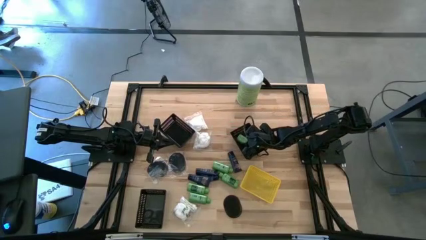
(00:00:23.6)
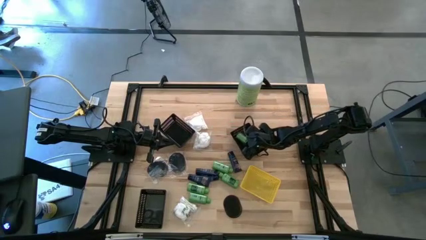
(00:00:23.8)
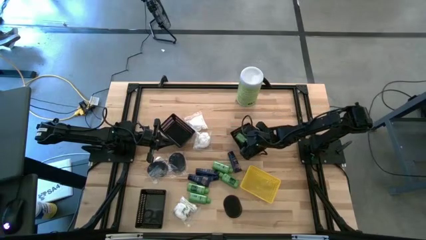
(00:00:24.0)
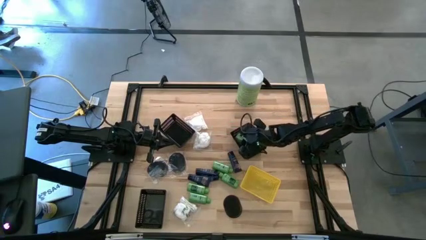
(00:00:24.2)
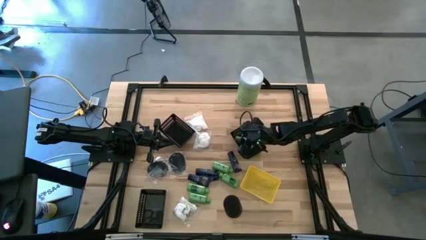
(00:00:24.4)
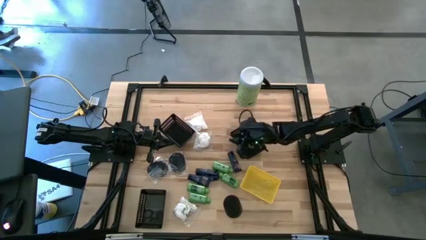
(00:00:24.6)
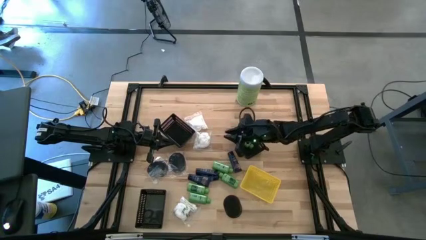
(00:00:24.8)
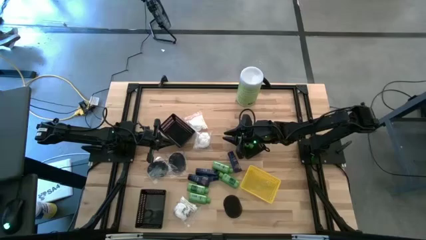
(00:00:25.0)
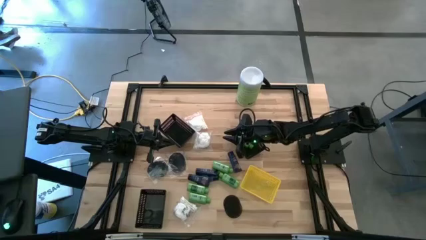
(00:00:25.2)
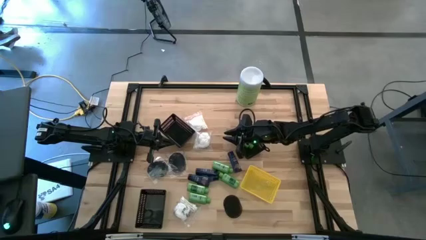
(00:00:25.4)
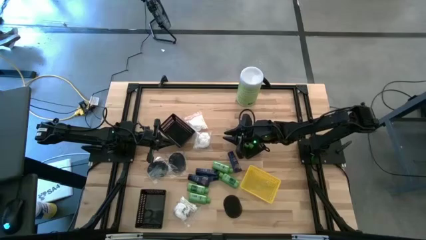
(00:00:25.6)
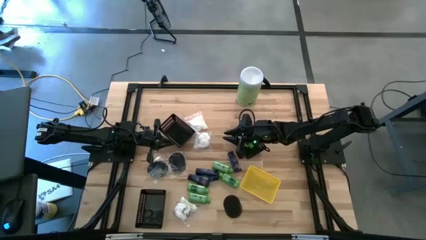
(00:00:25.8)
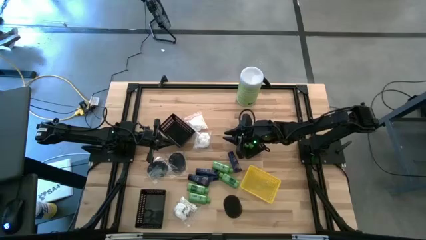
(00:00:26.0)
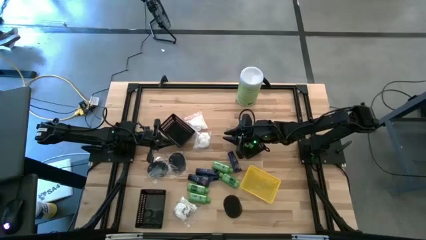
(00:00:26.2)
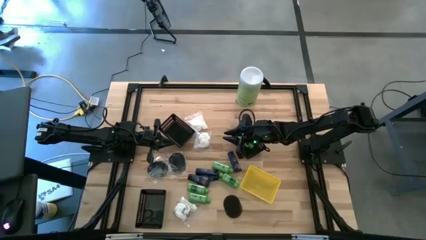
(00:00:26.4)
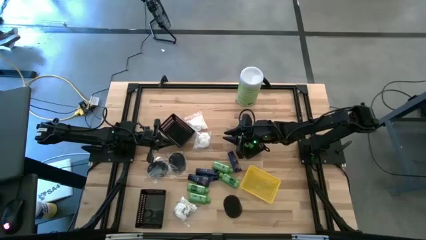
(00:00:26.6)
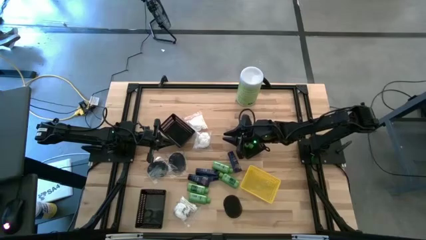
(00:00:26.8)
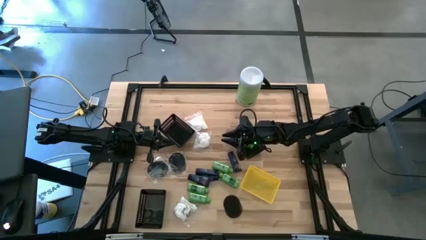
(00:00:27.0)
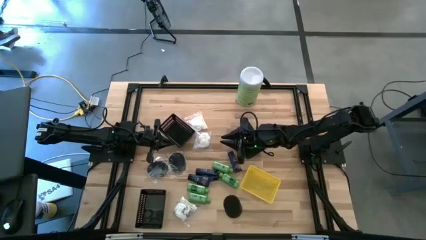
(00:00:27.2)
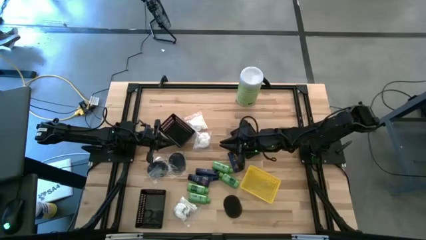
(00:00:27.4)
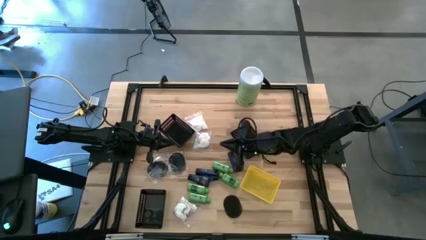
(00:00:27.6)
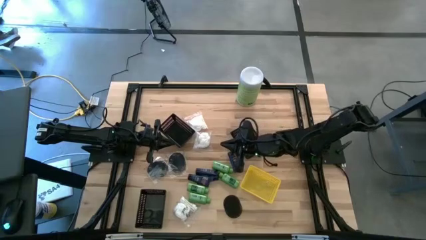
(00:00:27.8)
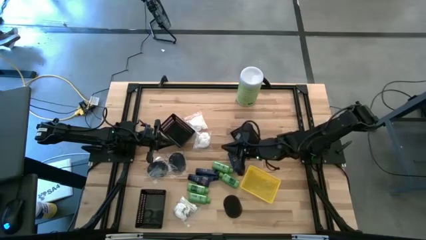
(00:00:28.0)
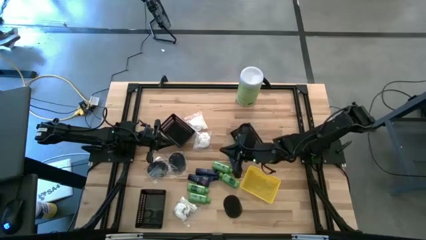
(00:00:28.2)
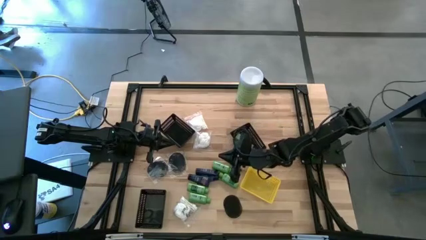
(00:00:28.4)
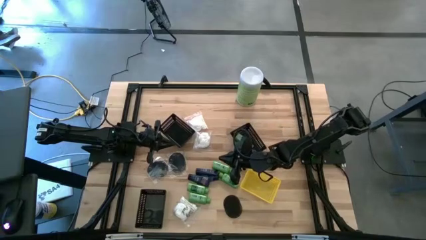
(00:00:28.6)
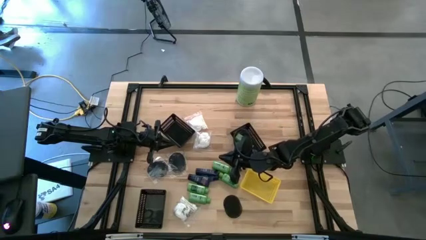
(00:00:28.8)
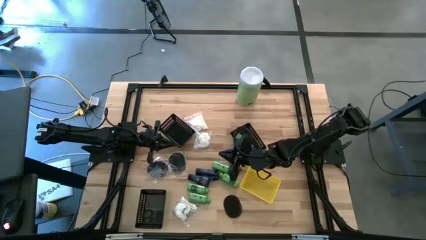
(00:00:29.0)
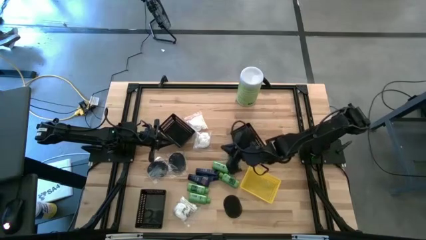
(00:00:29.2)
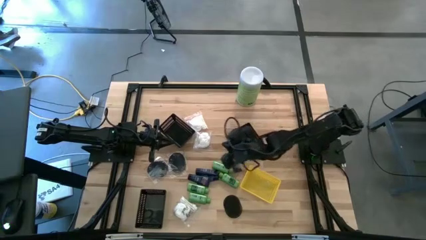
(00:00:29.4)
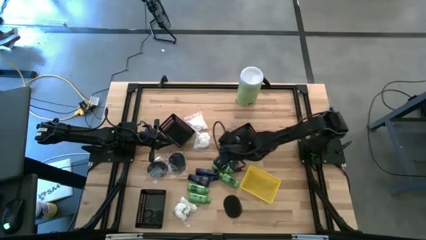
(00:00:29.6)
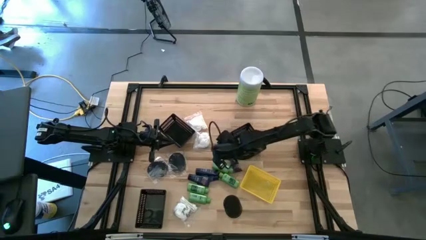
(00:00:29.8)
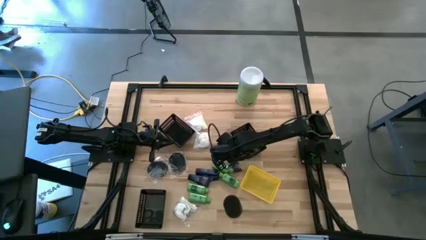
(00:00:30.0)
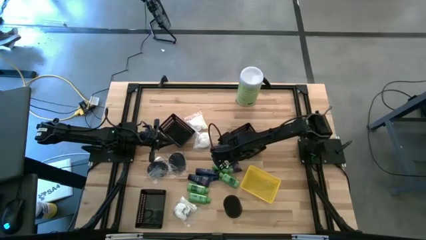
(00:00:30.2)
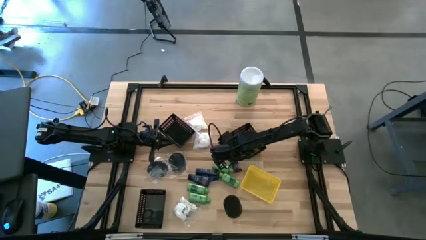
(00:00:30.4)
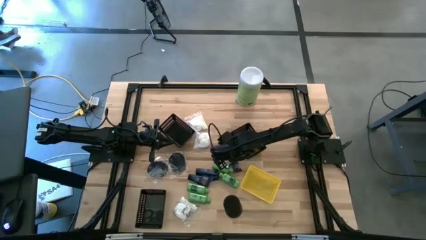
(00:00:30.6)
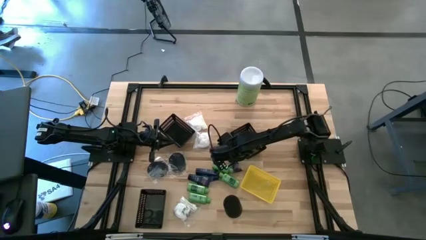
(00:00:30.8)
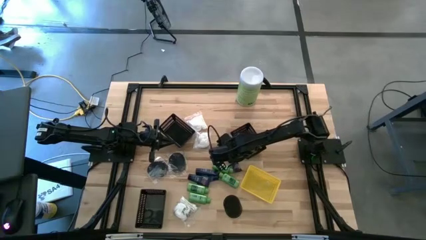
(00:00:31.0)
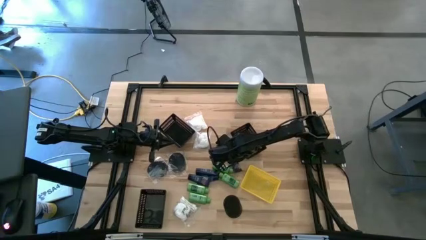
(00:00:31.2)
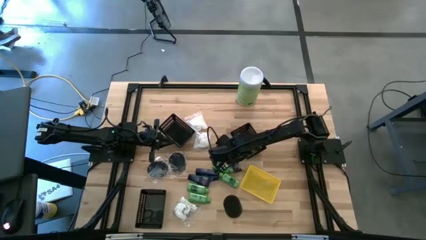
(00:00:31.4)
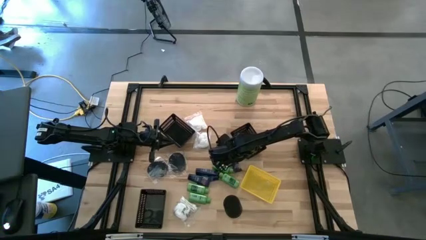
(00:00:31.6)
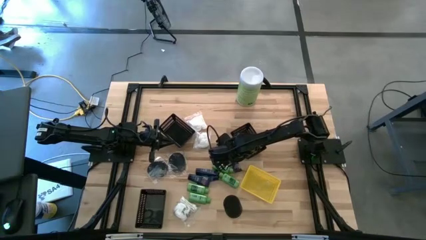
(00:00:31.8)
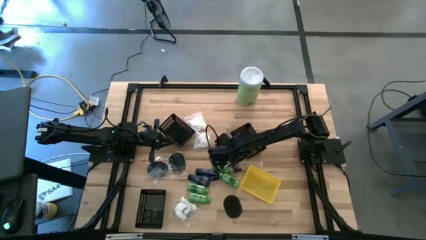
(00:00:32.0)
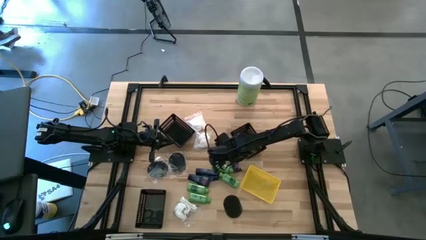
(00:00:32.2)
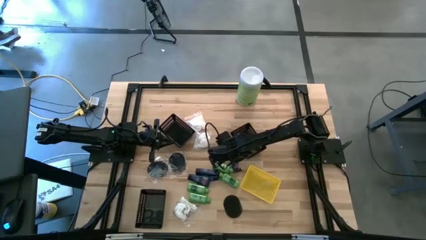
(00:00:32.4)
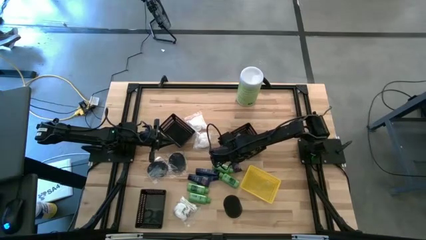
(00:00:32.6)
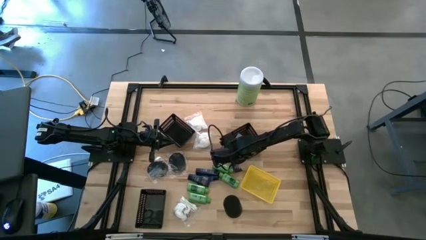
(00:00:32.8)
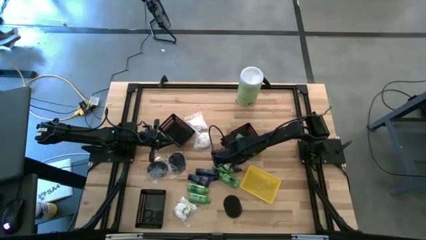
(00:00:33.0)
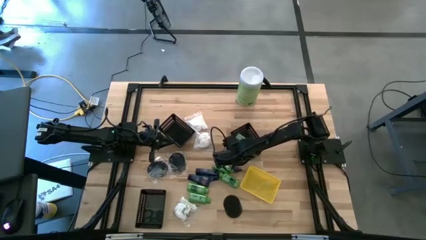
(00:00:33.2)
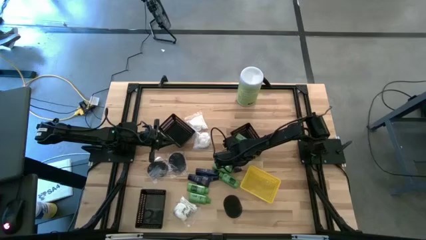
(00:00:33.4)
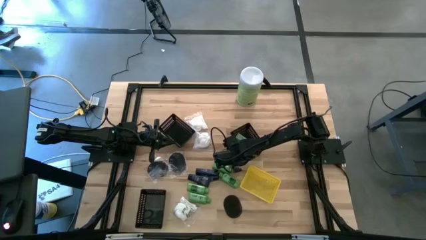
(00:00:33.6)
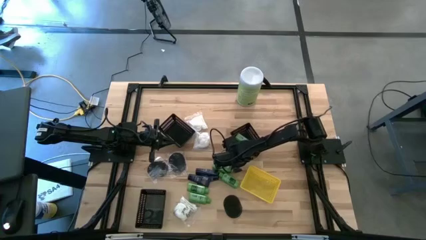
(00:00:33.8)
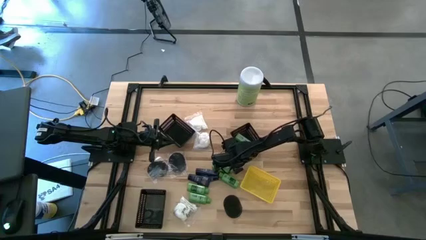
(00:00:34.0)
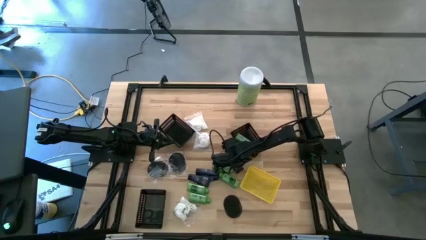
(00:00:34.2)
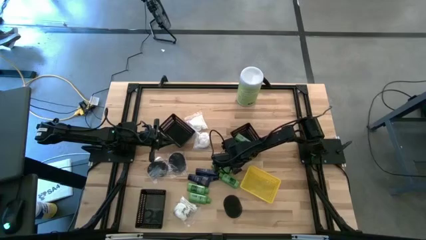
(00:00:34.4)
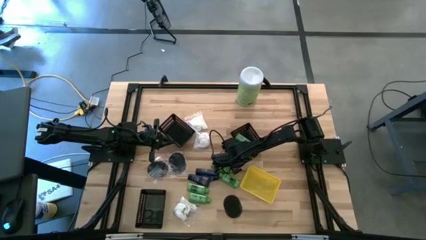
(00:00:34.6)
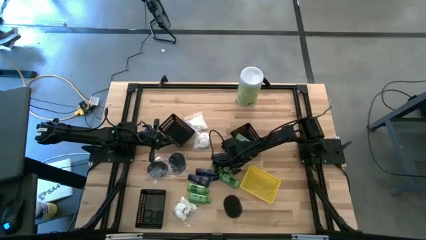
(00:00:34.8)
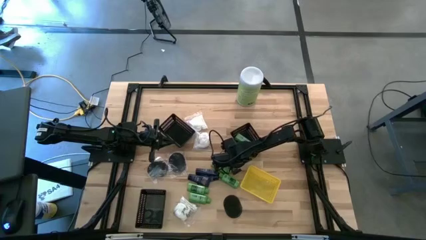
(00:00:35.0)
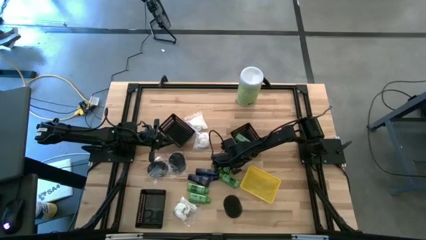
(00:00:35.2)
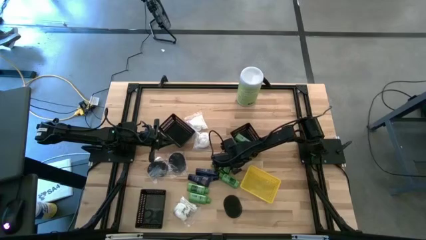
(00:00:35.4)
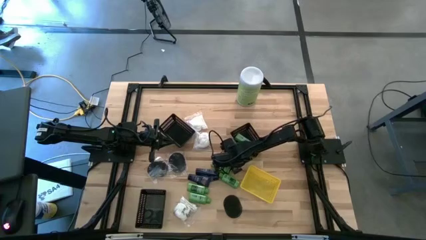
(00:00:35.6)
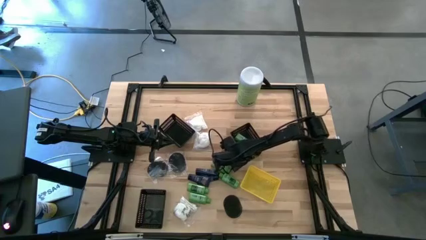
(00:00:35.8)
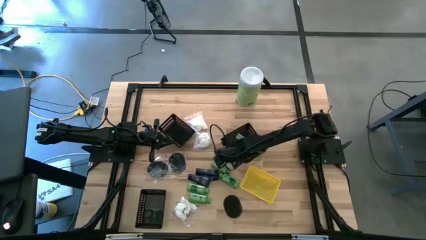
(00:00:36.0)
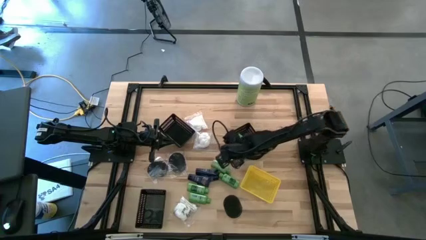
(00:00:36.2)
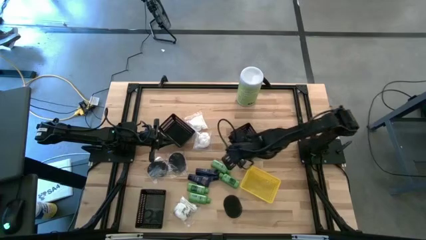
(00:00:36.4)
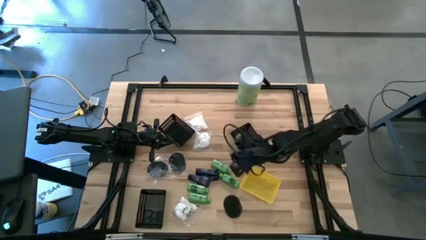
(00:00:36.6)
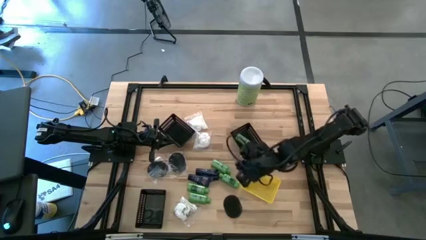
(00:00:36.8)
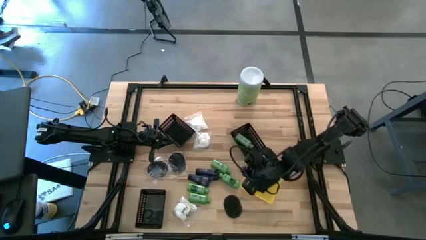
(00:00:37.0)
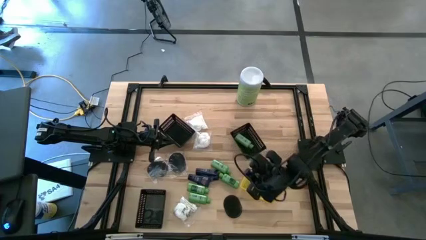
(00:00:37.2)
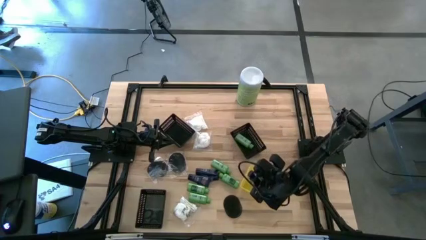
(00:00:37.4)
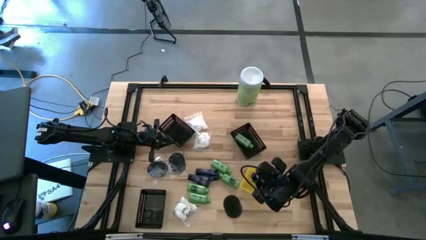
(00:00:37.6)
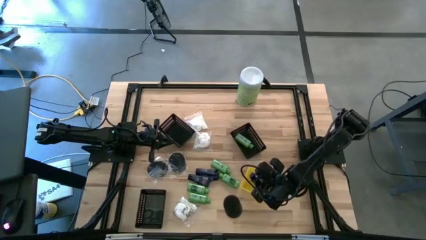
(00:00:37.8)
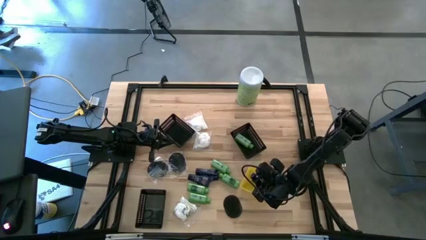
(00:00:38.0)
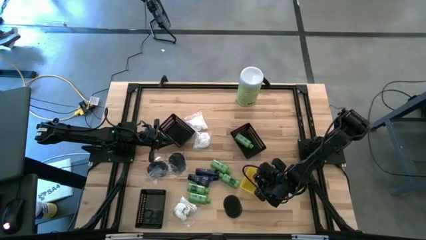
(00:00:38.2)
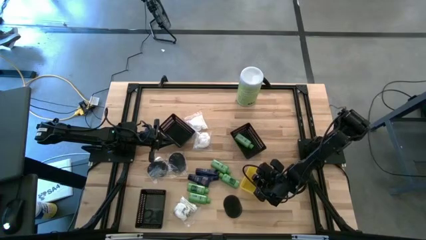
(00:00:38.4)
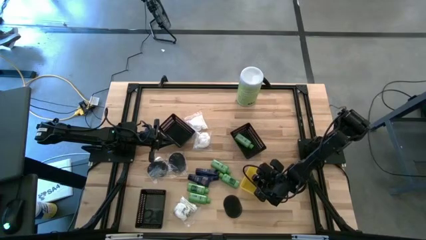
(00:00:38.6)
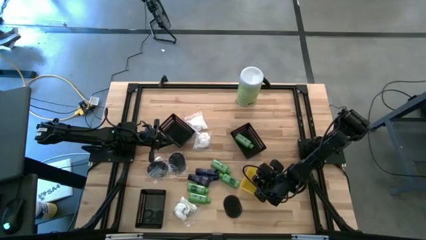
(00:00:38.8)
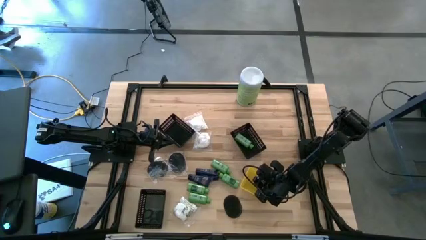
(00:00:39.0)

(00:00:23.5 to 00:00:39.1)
Task: Pick & Place Travel size toiletries
Put the shaving cream tube into the yellow bin
